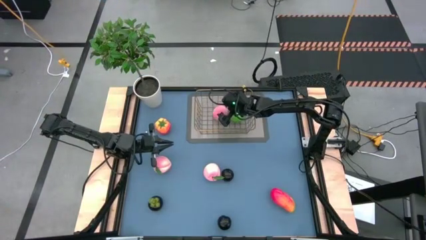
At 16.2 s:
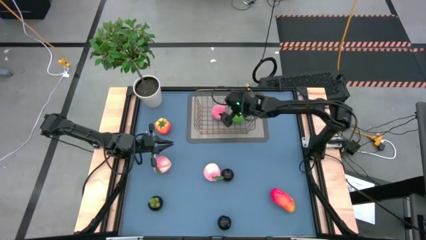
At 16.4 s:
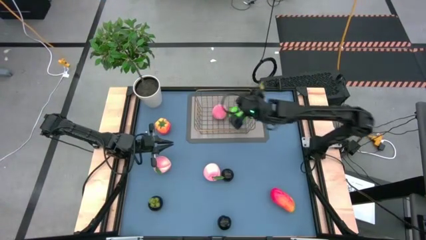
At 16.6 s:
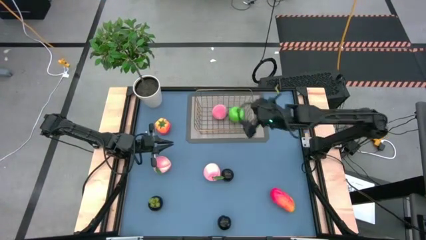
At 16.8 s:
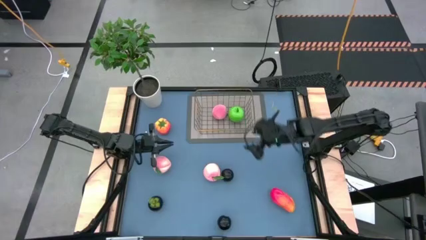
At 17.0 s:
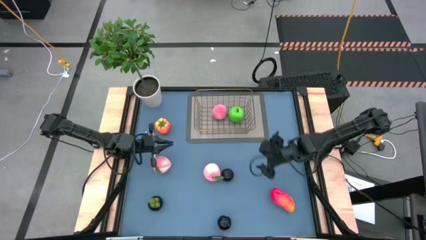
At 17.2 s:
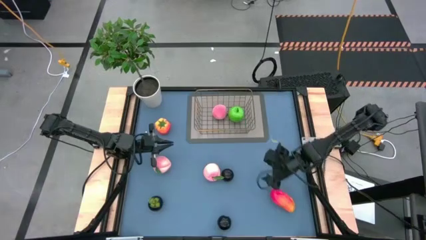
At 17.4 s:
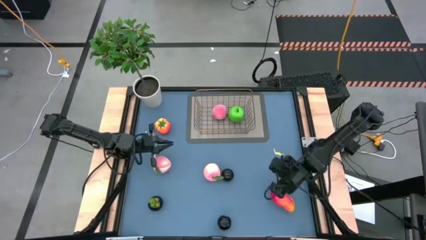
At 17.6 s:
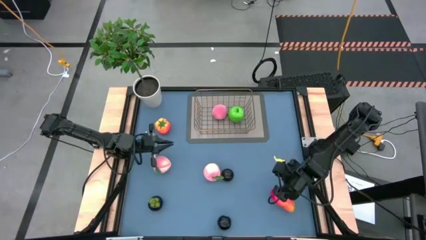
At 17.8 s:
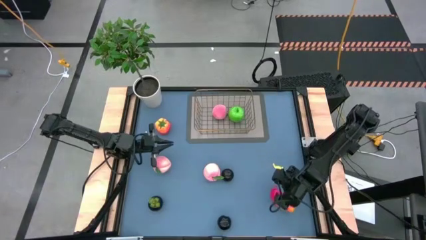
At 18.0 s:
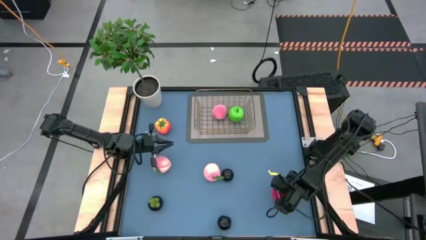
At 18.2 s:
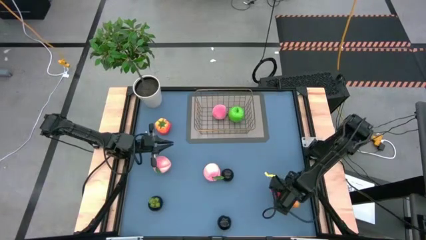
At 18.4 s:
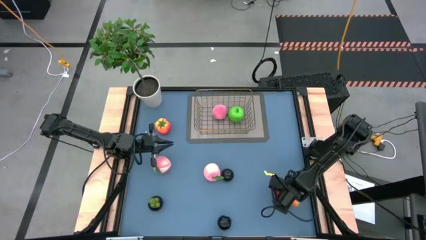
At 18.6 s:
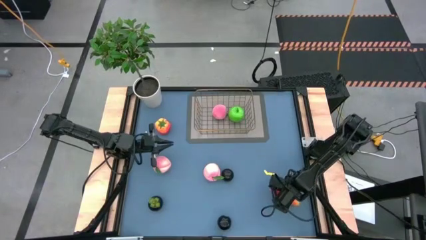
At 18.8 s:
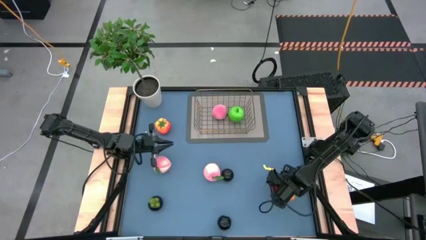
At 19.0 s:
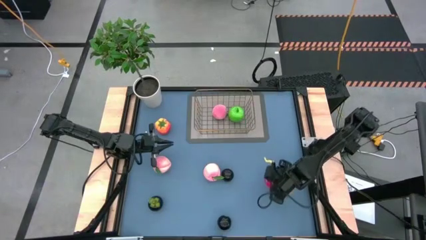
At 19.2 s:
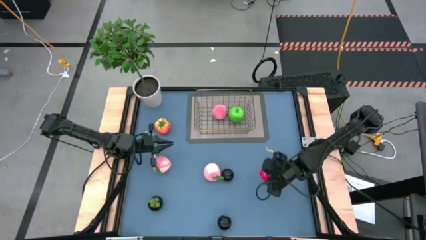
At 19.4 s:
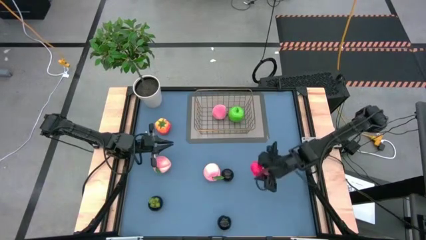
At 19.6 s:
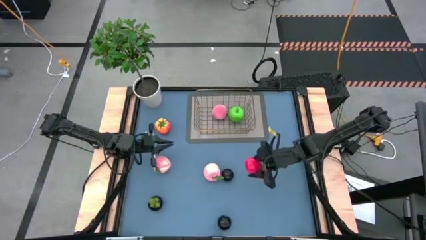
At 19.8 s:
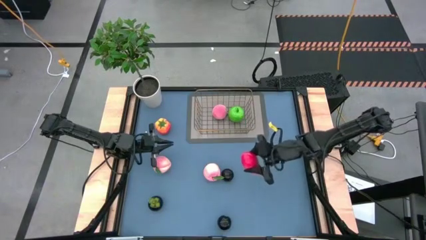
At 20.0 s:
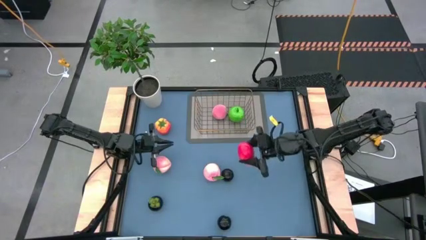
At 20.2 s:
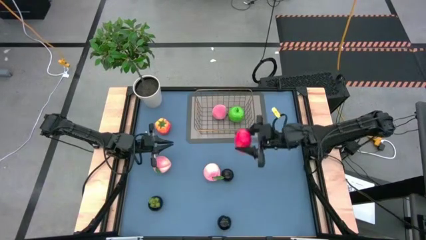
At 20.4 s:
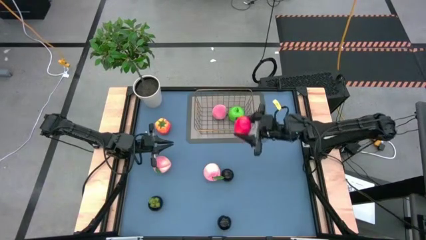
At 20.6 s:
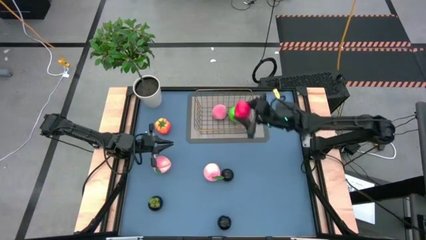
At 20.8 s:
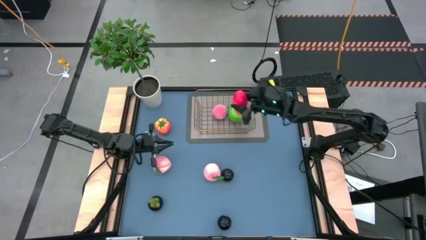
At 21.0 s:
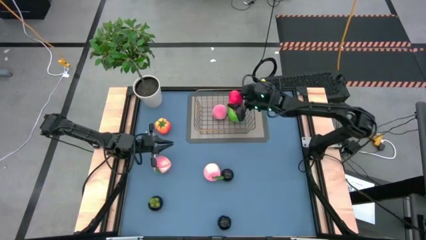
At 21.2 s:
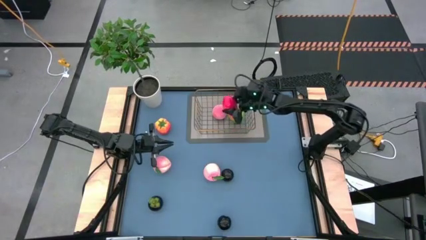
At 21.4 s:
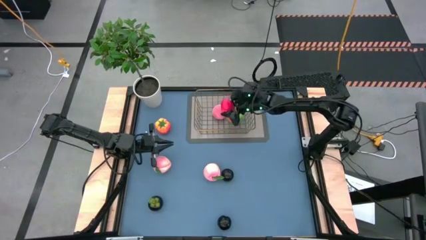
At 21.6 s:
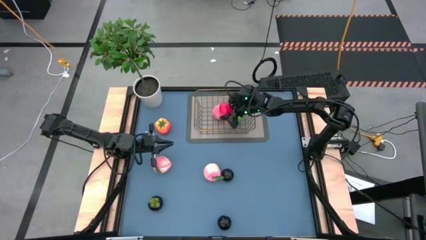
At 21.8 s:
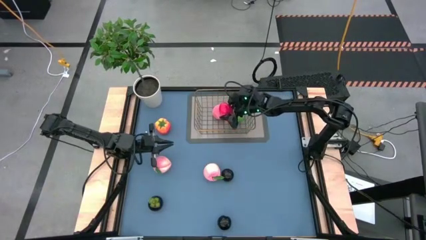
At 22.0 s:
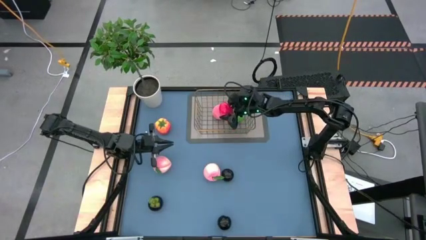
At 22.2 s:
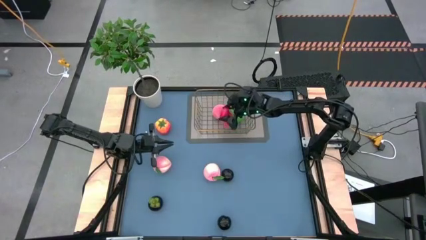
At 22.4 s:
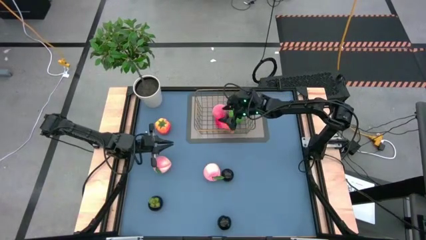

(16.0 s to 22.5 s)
Task: Build produce basket
Put the red mango into the wire basket

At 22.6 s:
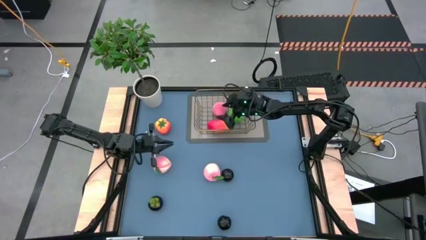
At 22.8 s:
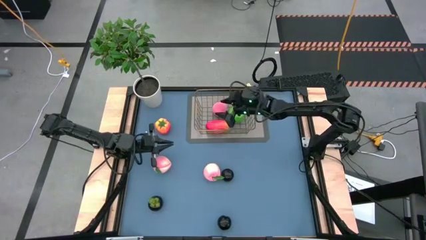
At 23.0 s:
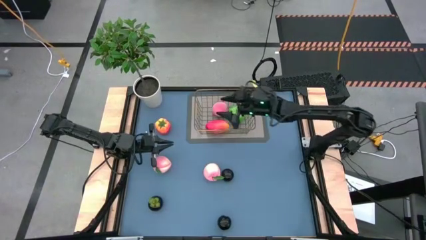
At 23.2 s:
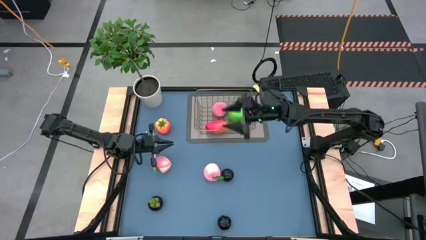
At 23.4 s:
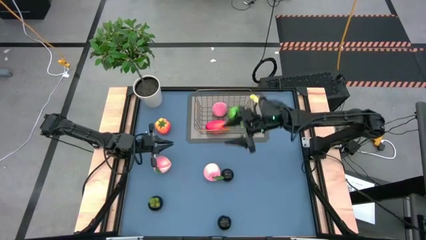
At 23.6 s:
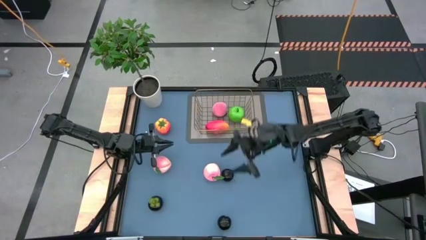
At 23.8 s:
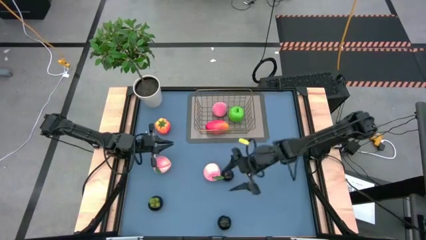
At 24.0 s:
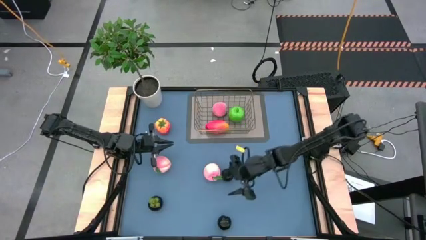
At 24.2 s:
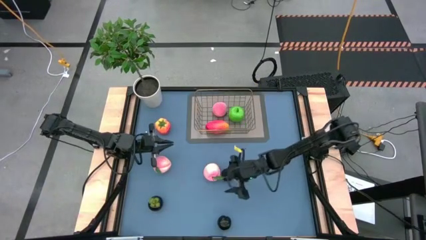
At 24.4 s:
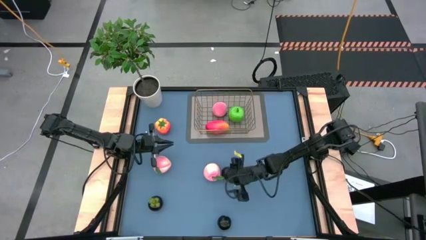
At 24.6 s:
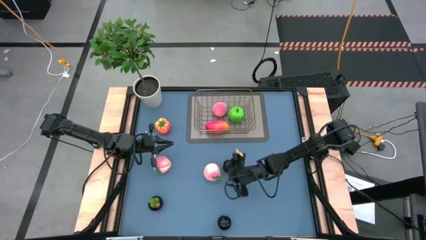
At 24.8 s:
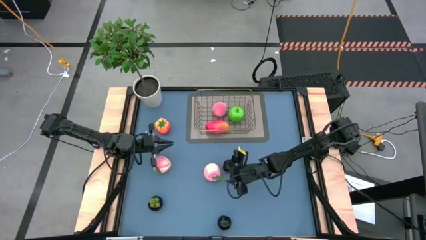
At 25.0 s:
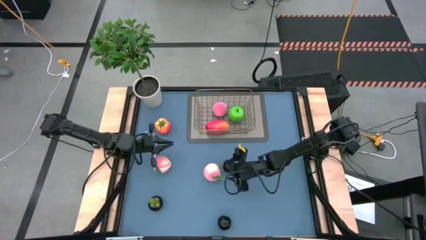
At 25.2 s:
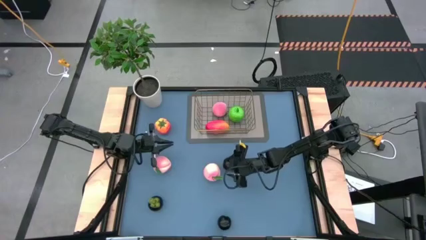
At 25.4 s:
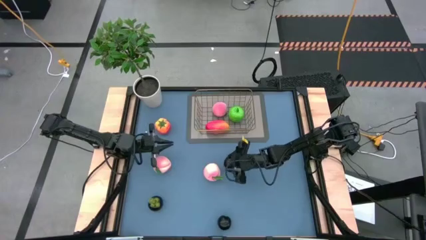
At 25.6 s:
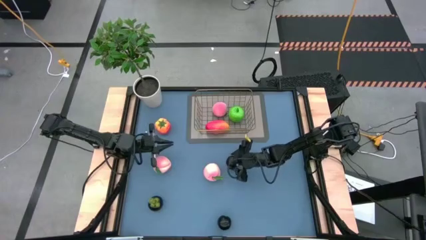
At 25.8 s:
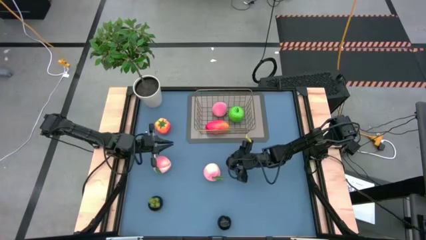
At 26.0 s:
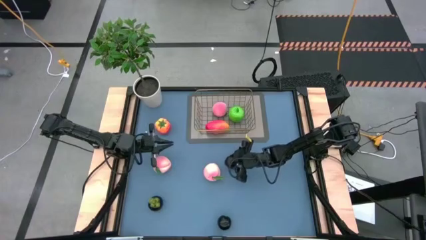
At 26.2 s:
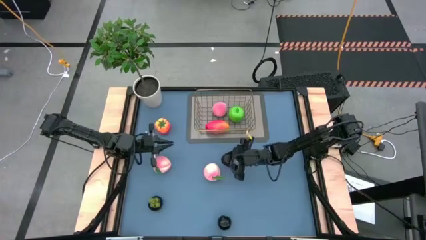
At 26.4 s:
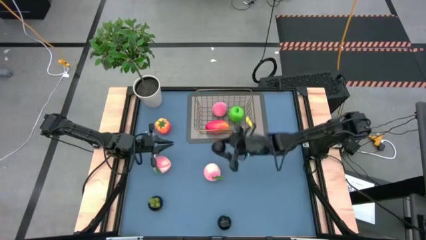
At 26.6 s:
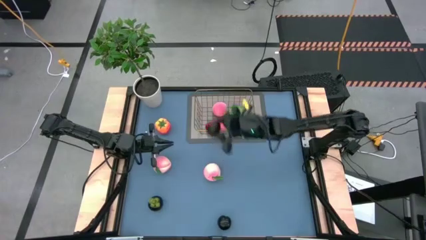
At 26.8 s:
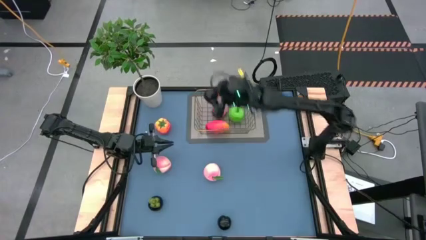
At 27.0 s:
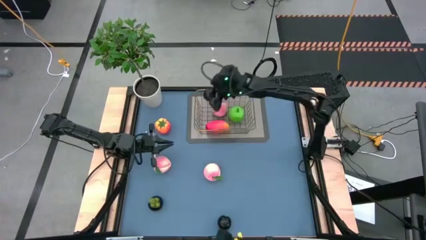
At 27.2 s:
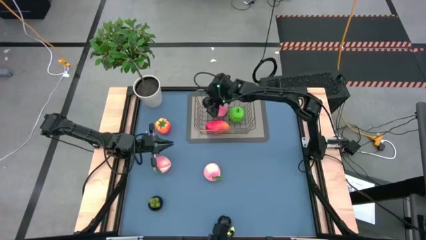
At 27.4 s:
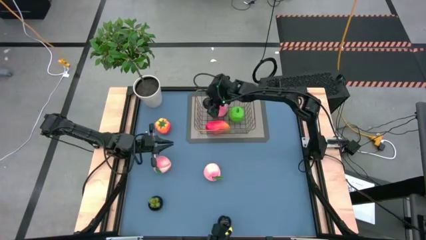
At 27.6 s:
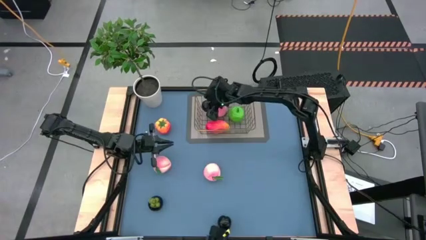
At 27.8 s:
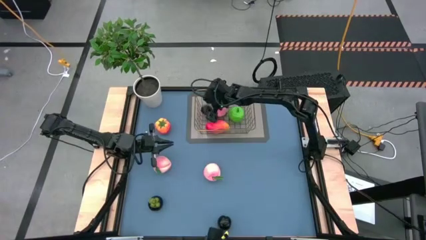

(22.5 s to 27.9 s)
Put the top right black plum into the wire basket

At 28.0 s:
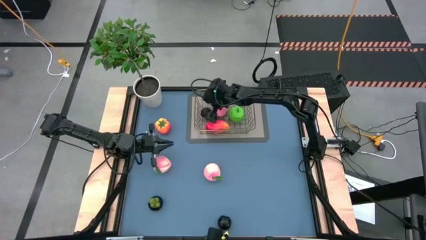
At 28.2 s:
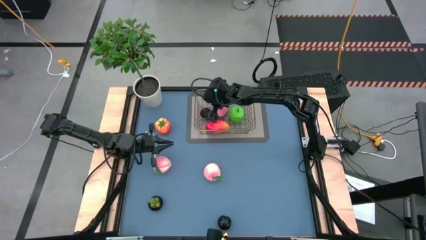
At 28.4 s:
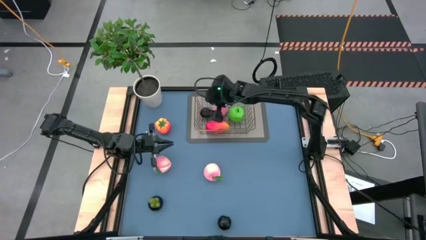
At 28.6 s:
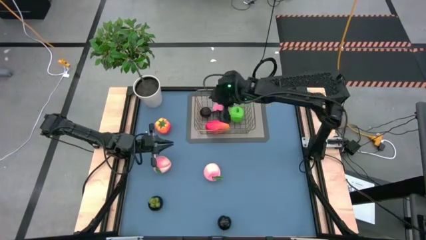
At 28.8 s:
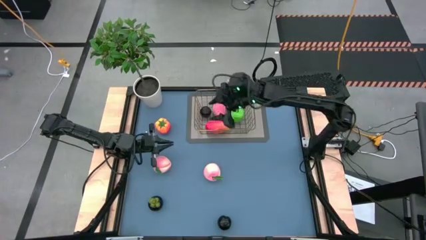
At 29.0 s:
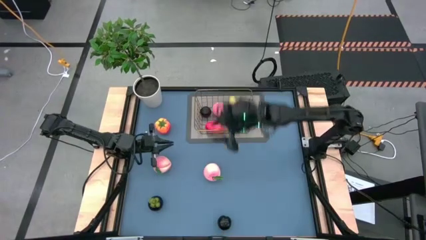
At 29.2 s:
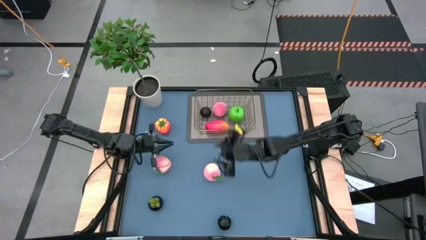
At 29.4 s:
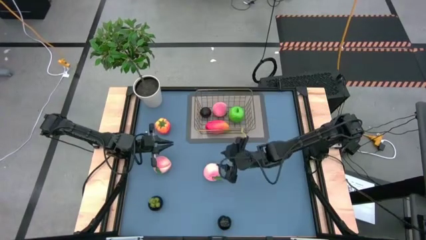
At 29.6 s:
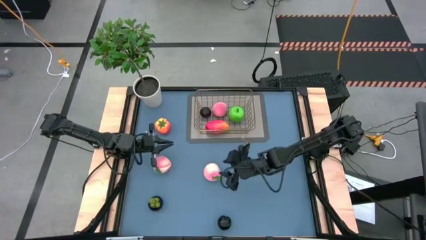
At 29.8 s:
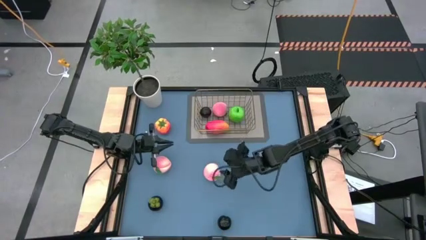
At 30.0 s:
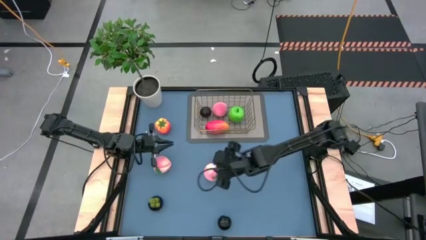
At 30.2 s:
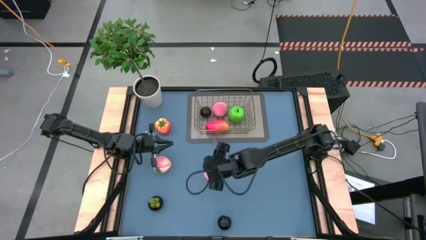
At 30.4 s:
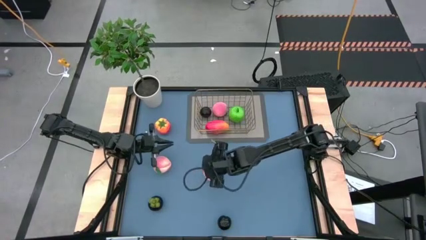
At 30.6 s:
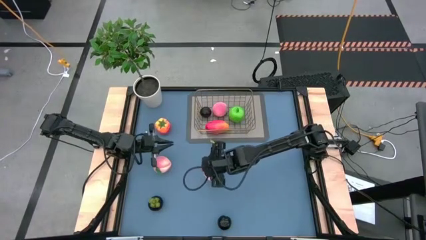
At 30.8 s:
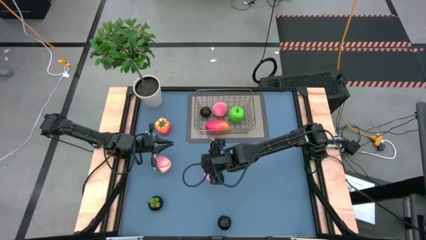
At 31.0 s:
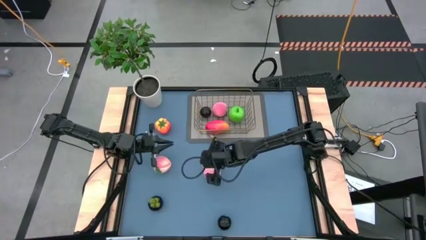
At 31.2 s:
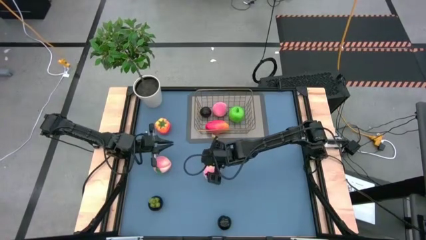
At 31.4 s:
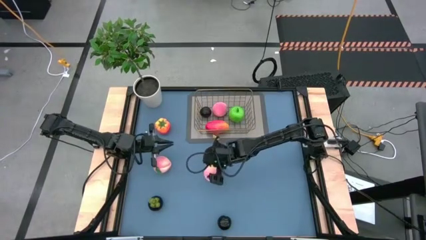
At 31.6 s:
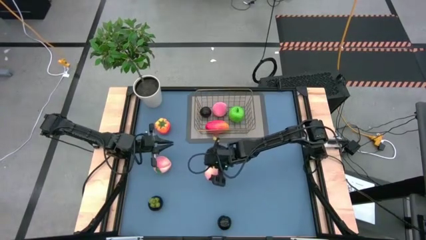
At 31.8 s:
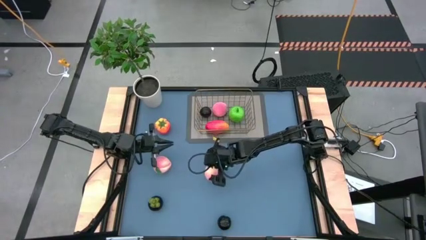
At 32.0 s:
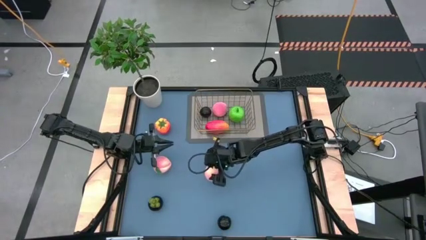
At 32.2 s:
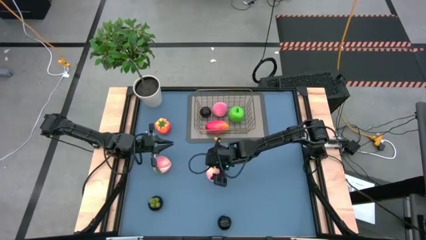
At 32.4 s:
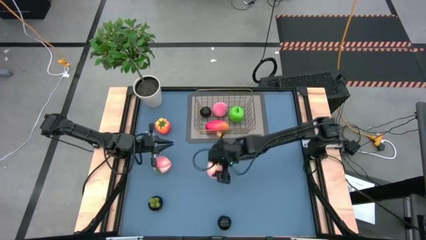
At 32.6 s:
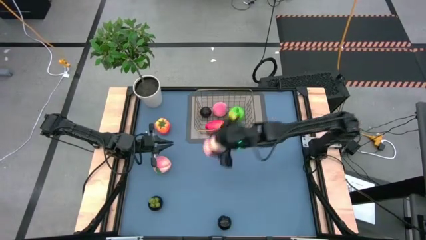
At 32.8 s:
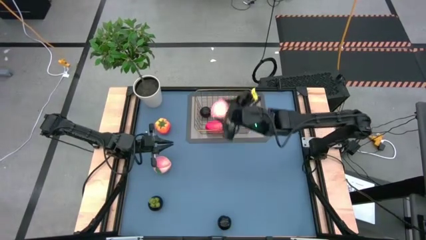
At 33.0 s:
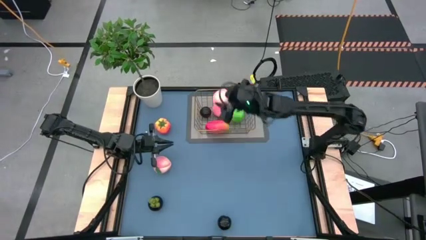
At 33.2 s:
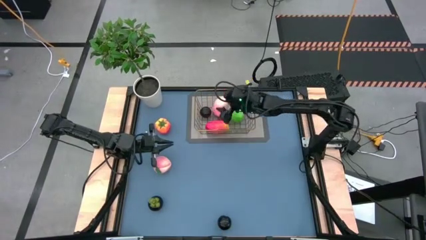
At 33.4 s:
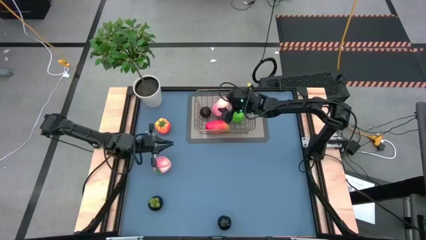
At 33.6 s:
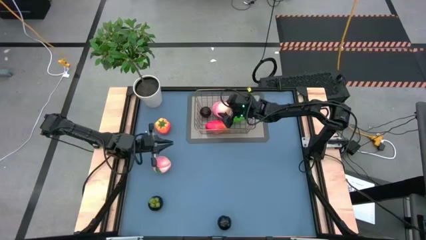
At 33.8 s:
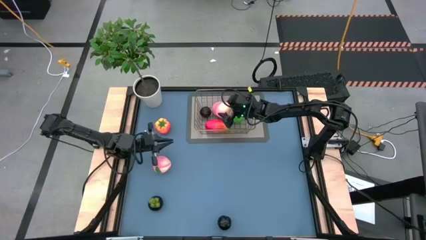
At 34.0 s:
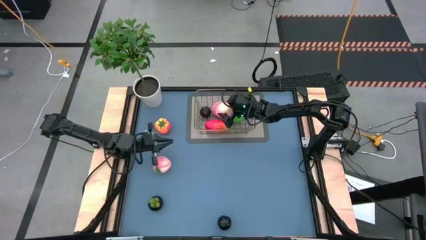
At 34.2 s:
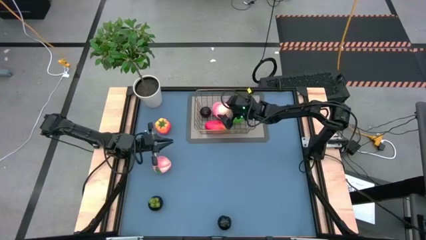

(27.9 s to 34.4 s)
Put the right pink peach into the wire basket
